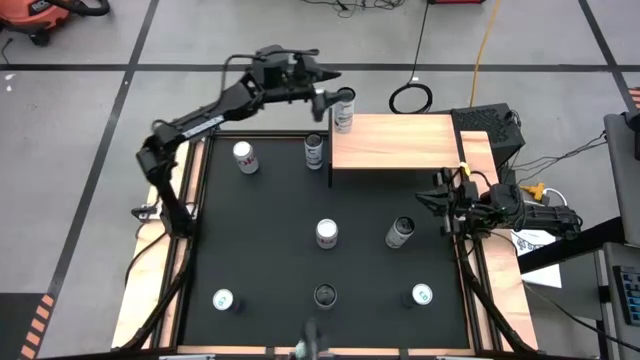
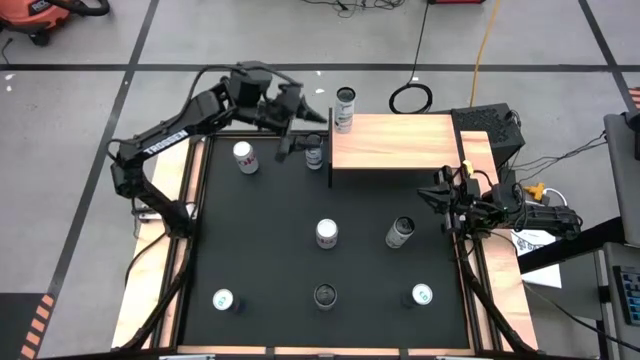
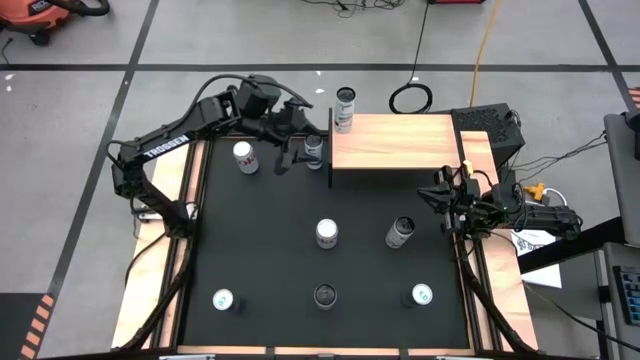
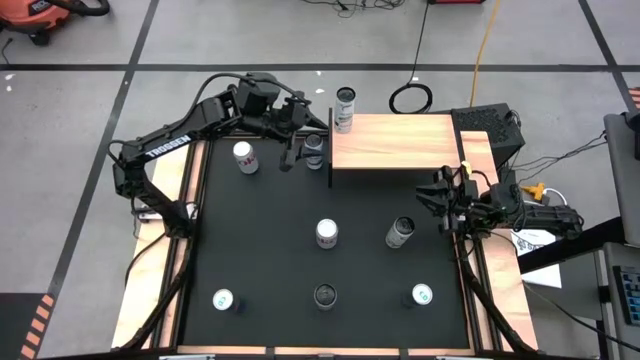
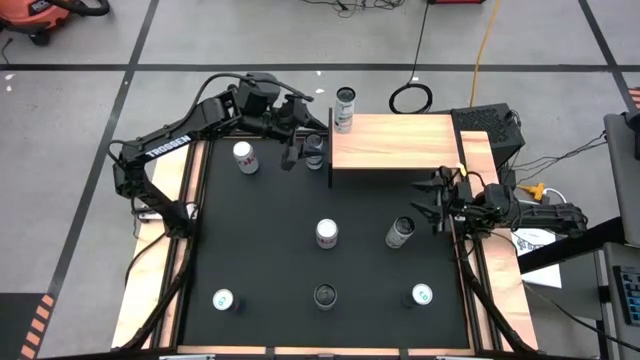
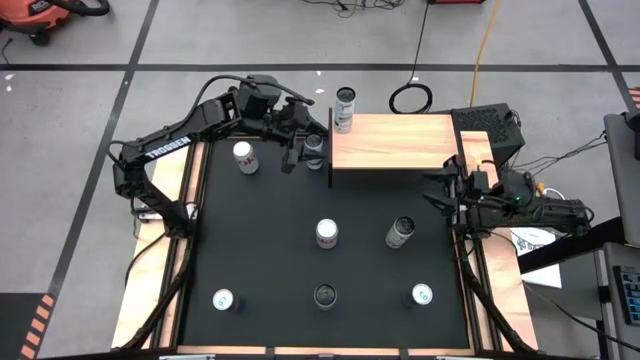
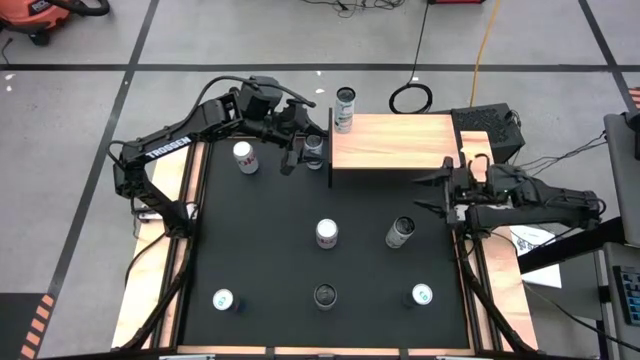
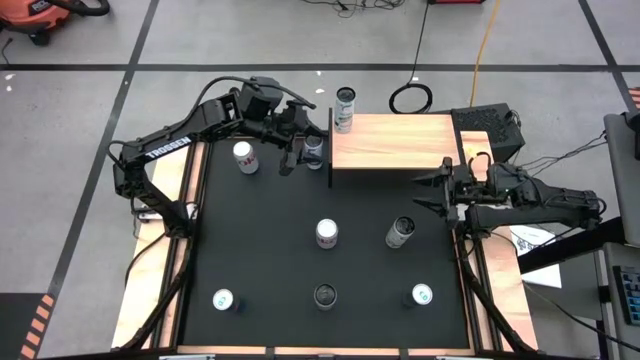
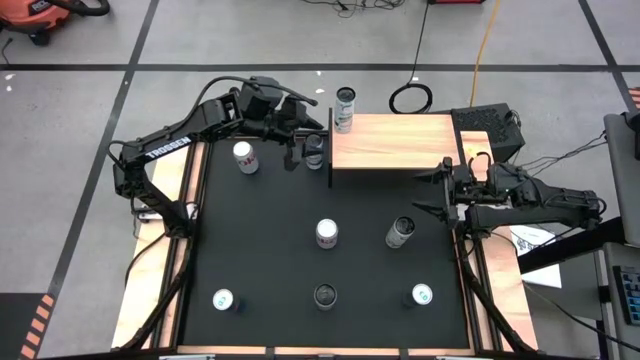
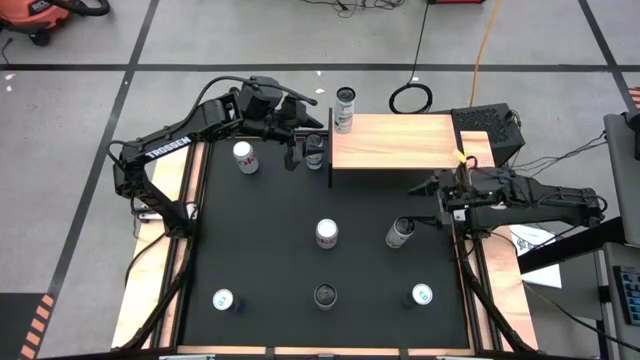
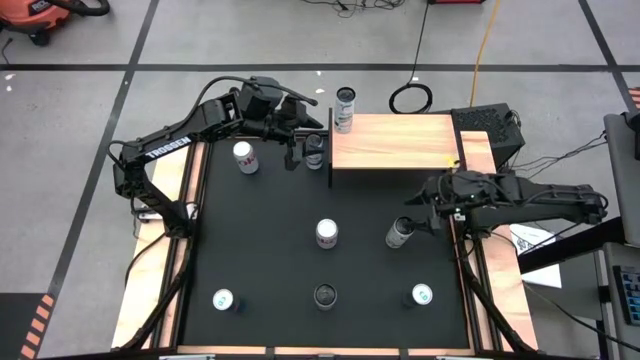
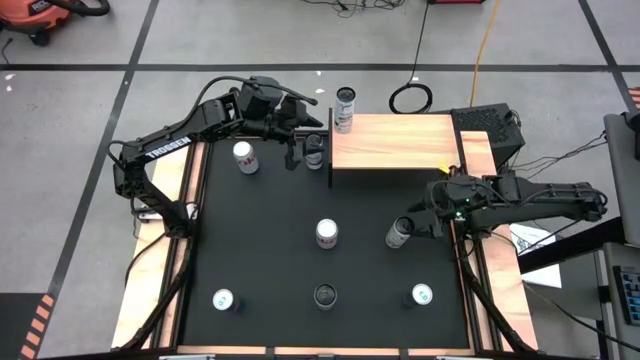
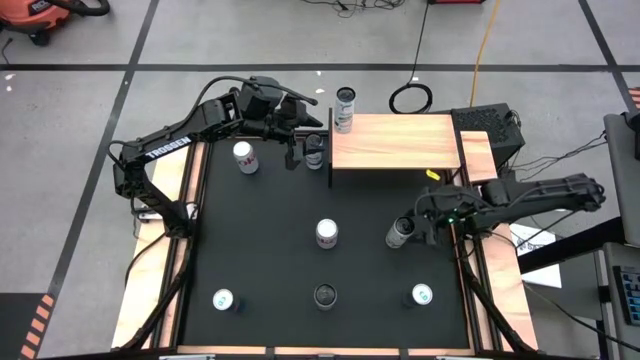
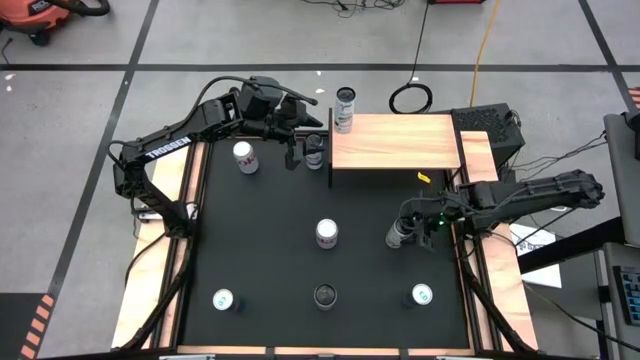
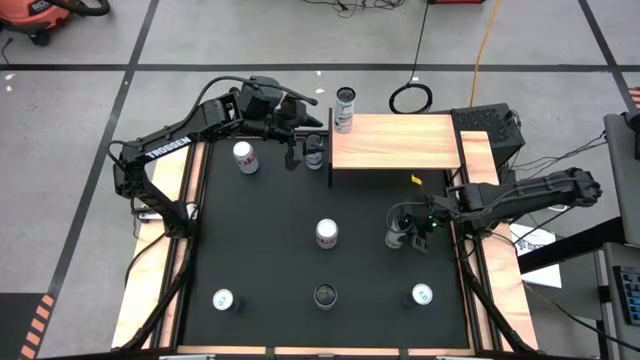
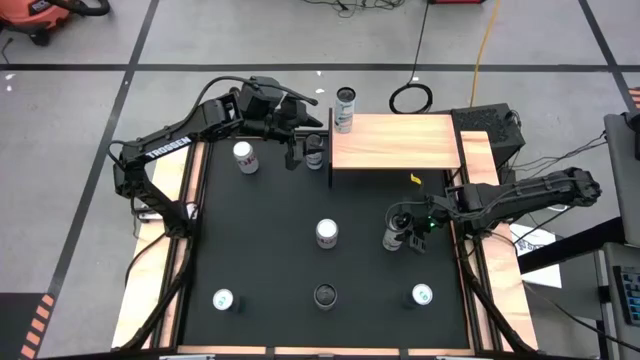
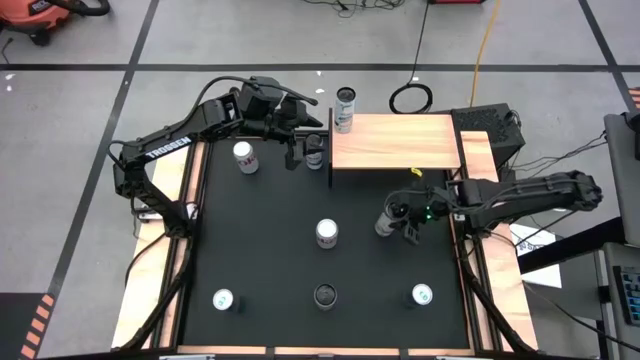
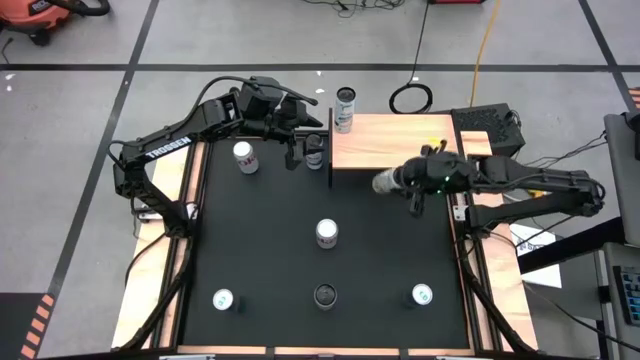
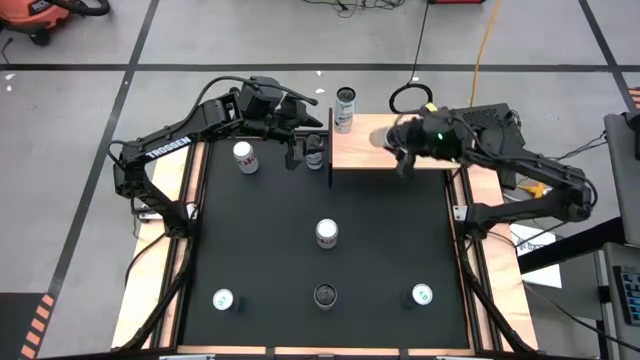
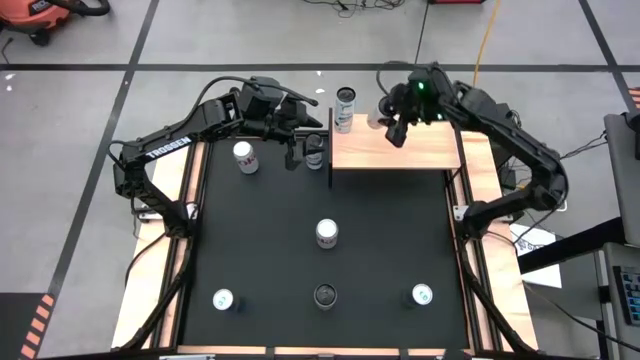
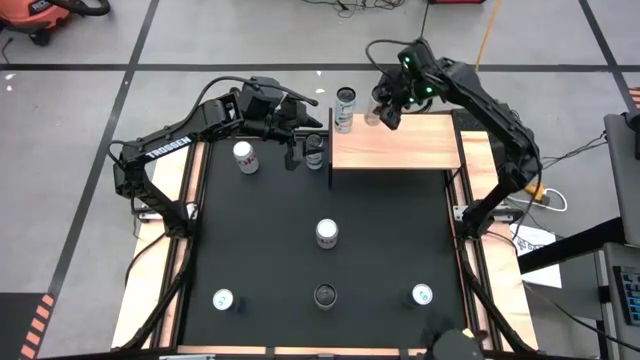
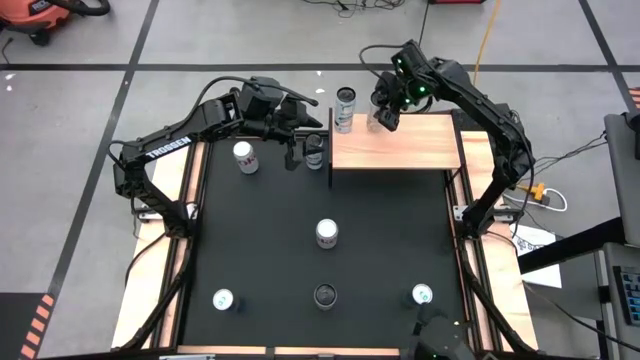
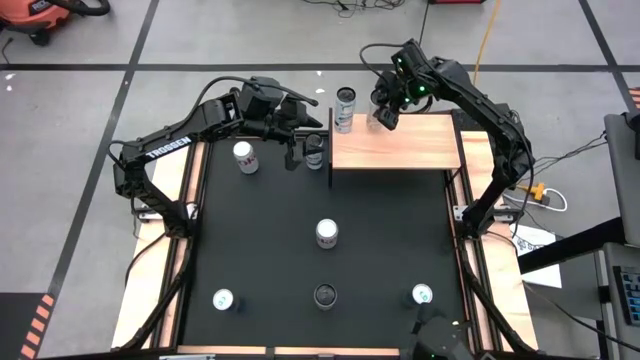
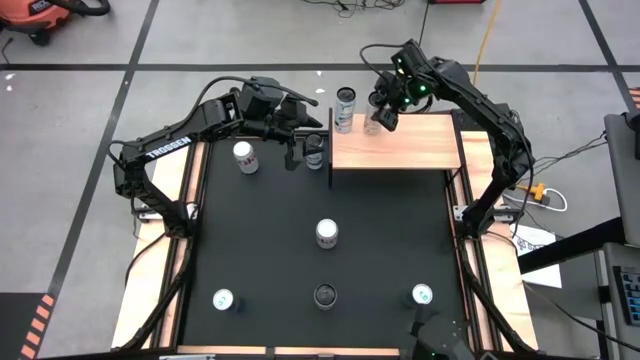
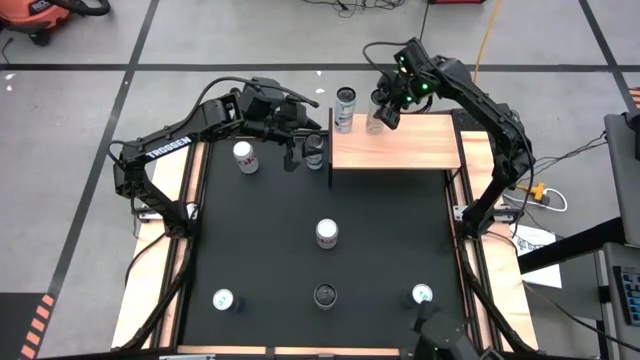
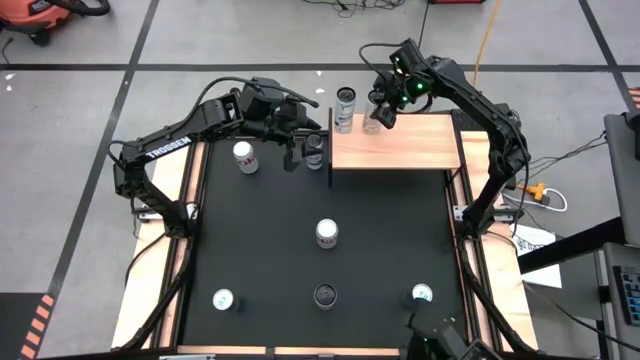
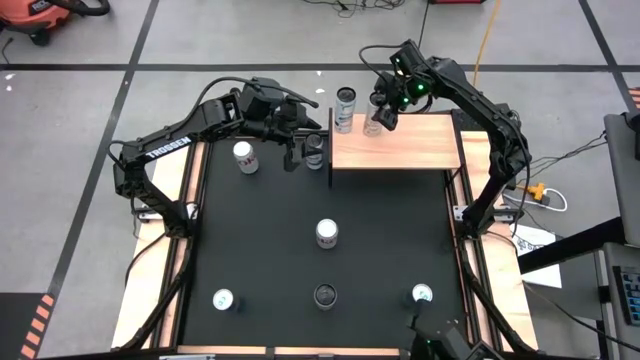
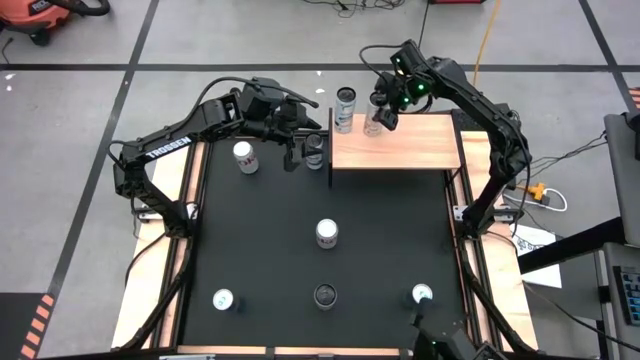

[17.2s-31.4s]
Task: Place canned beverage on shelf
Put the top white-yellow soda can on the shelf

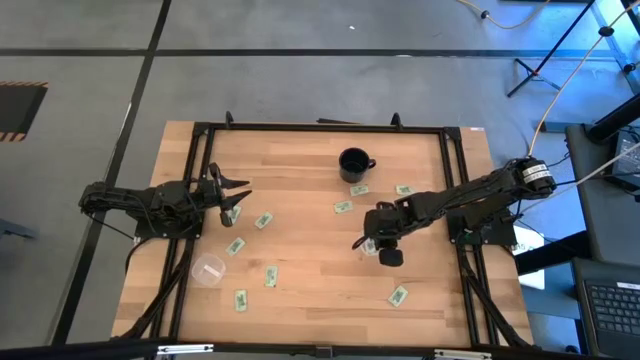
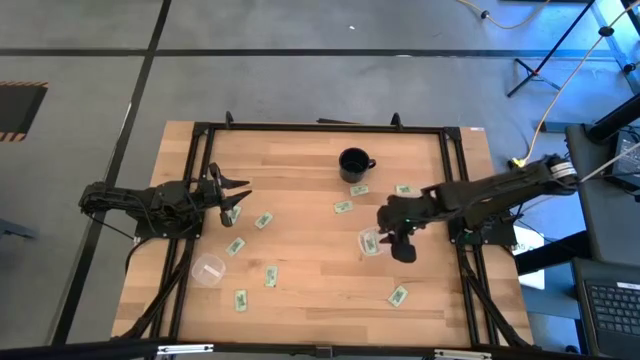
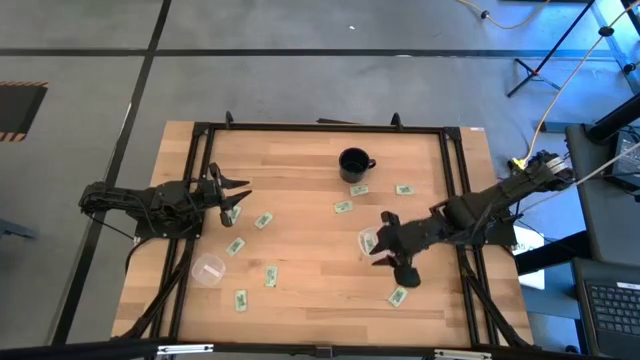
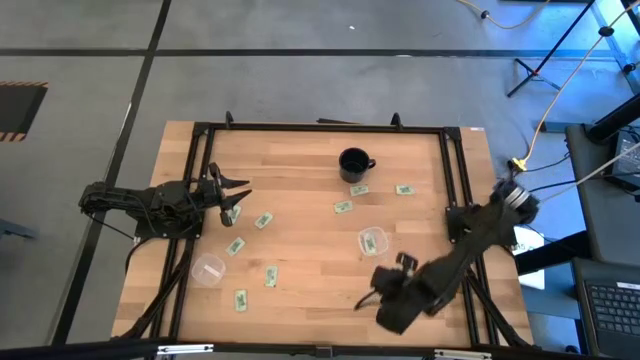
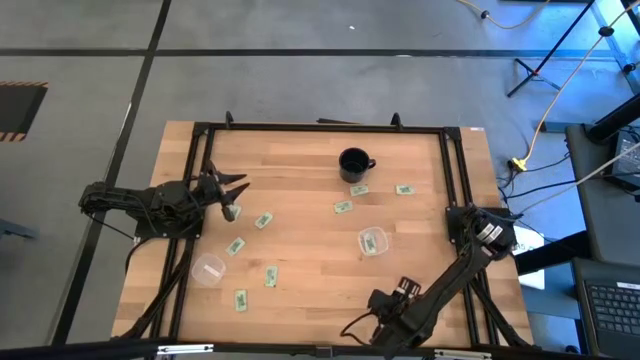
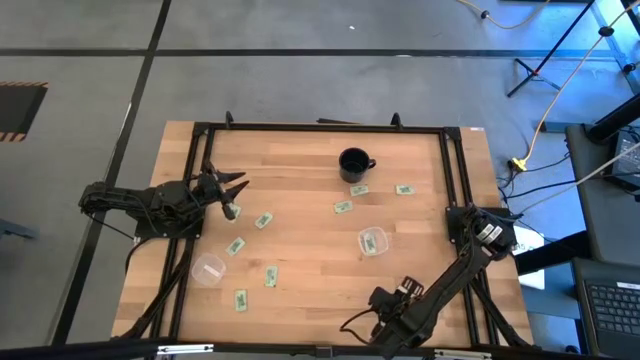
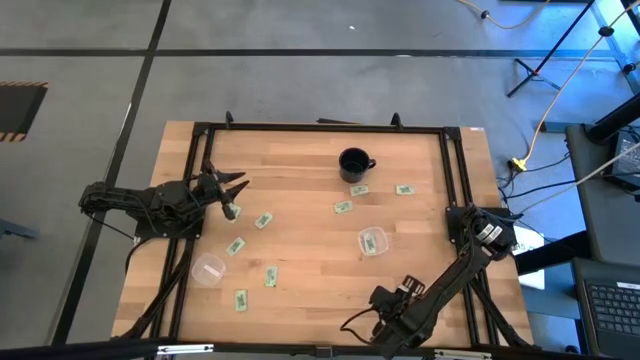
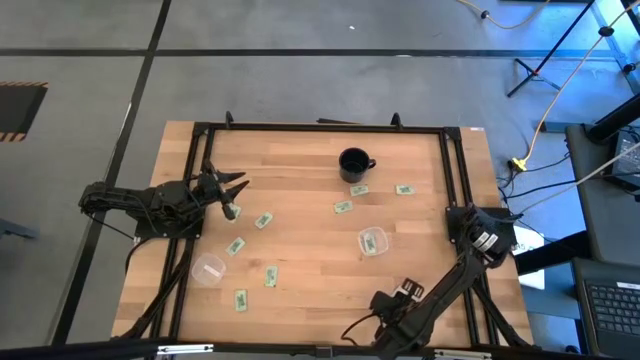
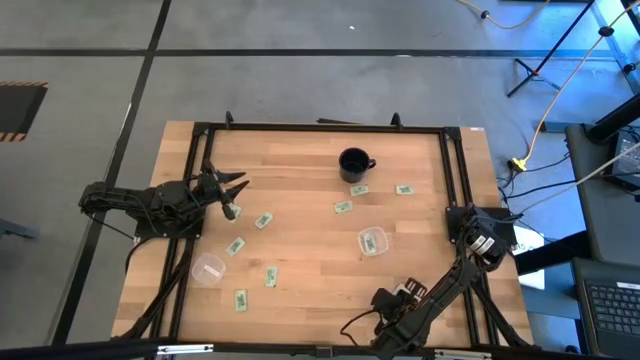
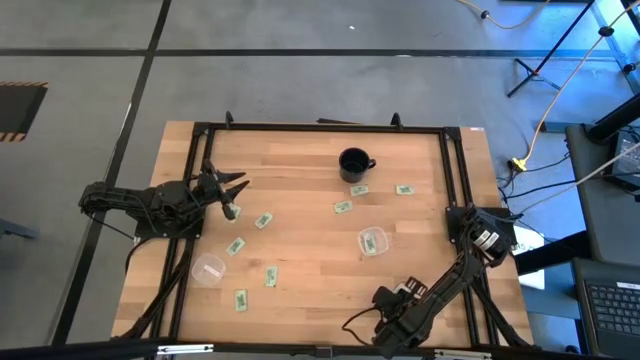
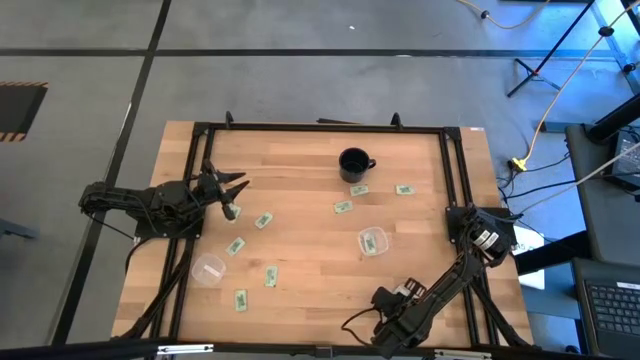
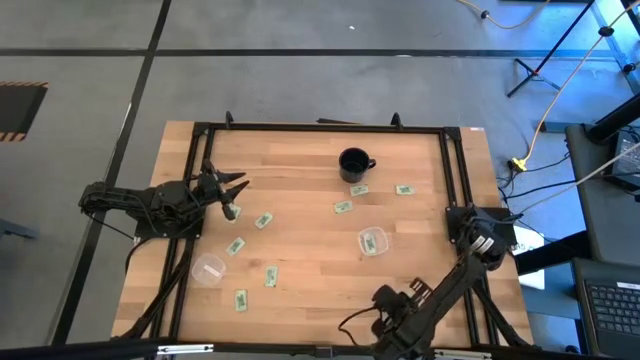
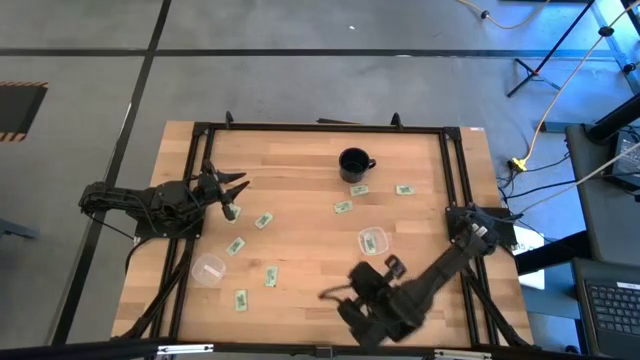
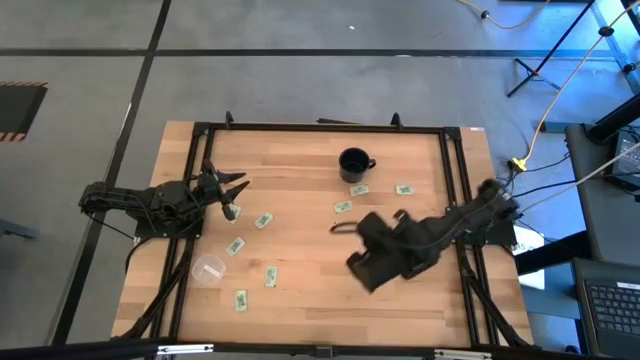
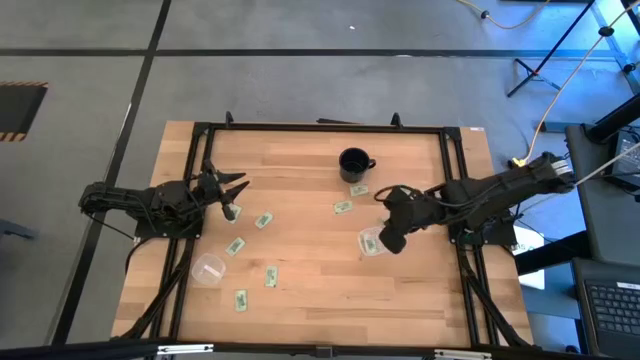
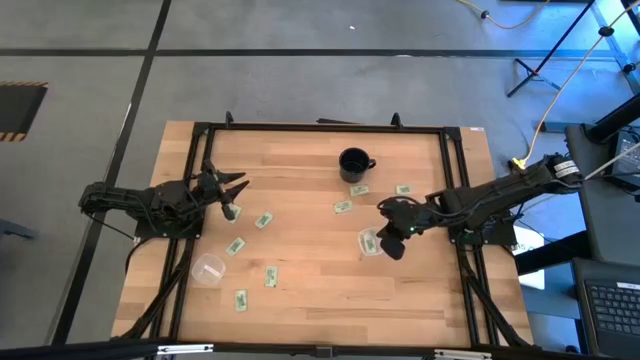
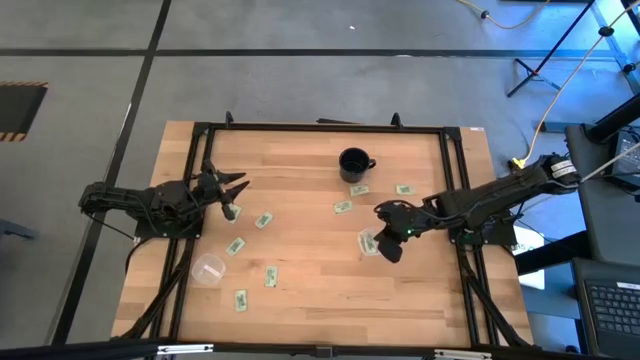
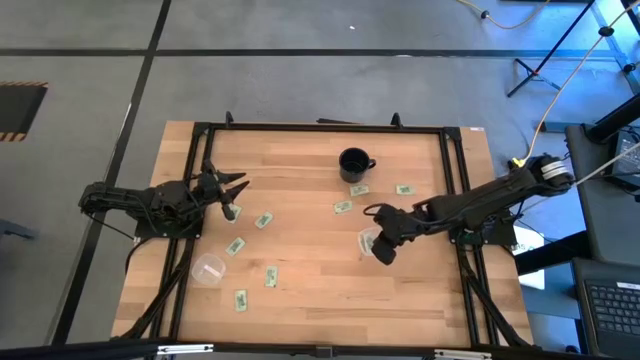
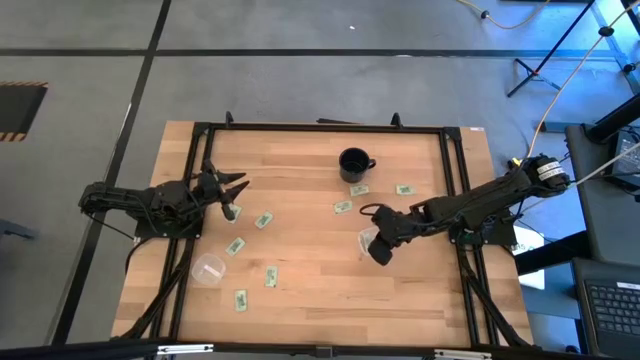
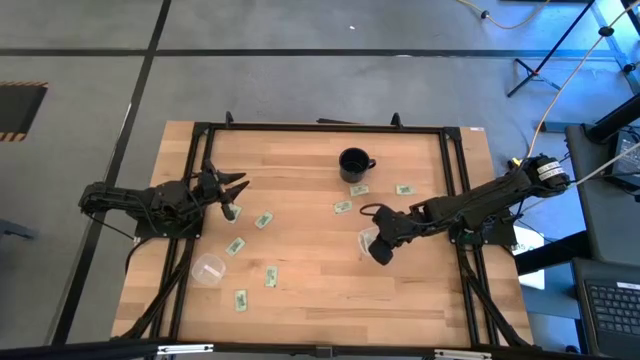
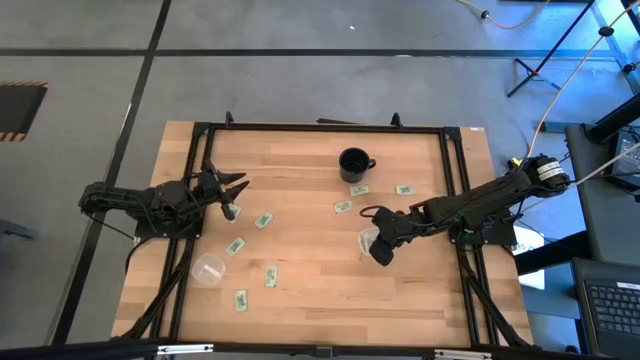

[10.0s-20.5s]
Task: Pick and place Stevia / Truvia into bins
Put the stevia packet into the right transparent container
